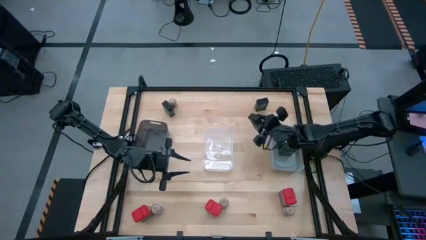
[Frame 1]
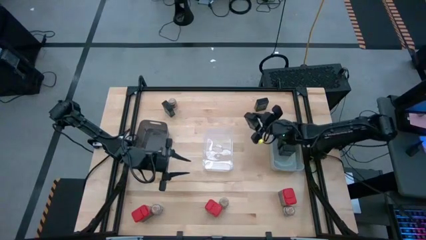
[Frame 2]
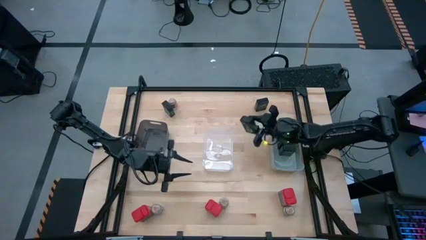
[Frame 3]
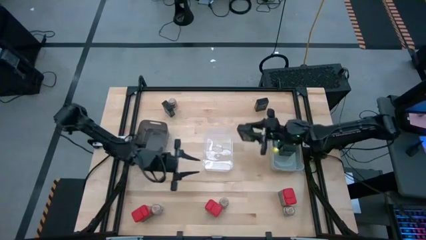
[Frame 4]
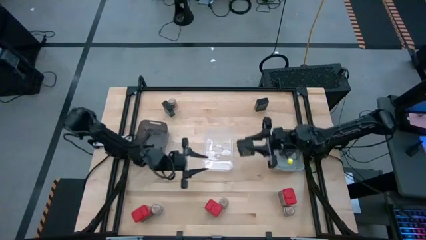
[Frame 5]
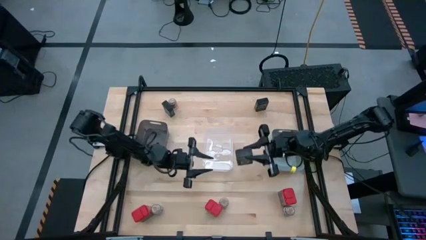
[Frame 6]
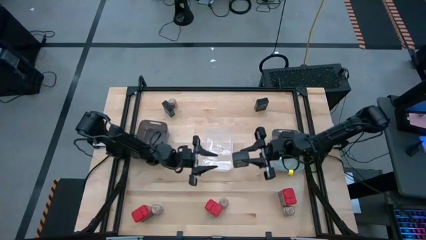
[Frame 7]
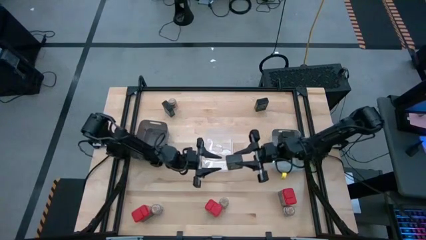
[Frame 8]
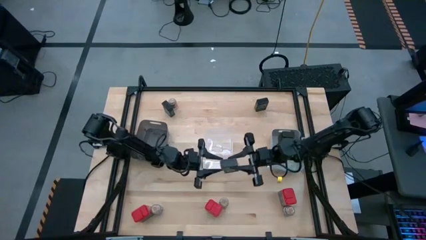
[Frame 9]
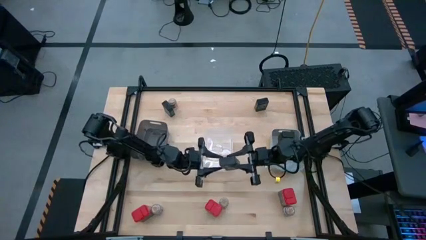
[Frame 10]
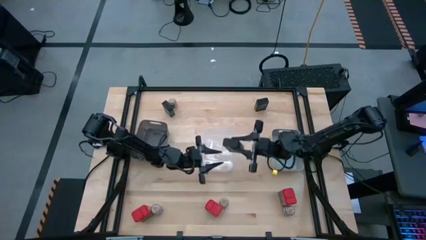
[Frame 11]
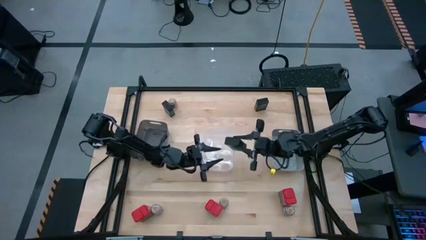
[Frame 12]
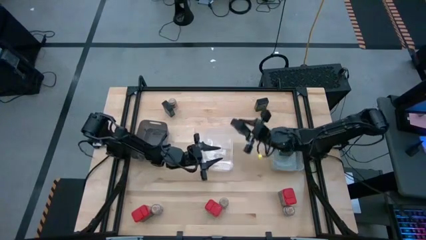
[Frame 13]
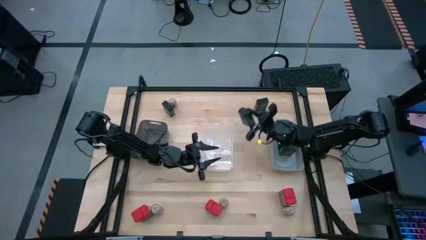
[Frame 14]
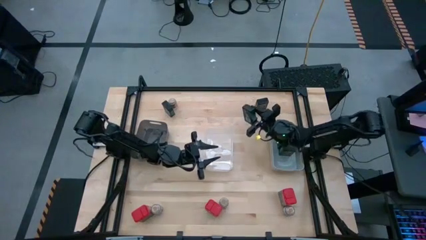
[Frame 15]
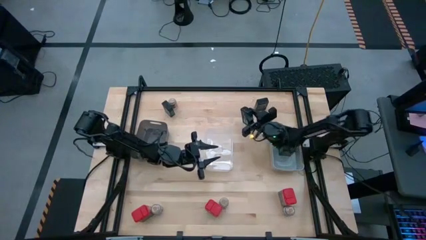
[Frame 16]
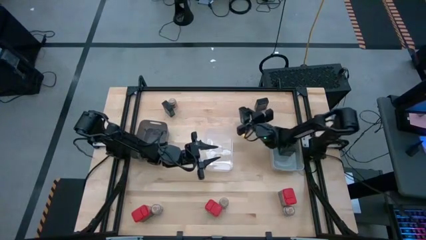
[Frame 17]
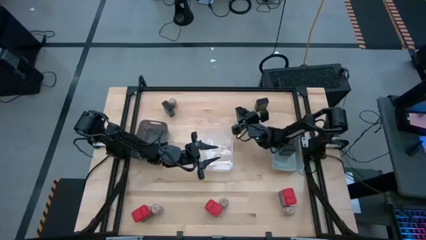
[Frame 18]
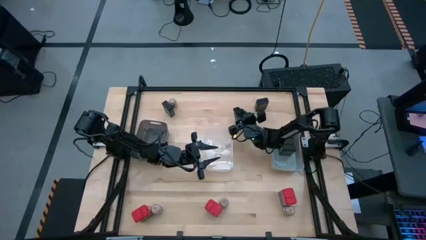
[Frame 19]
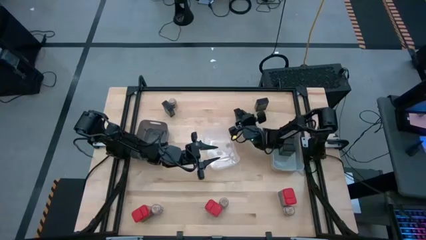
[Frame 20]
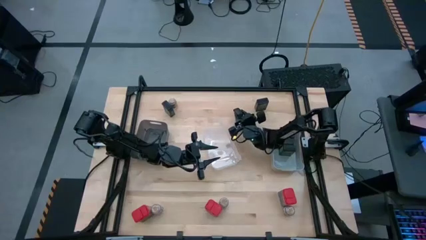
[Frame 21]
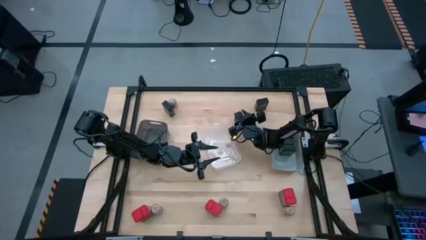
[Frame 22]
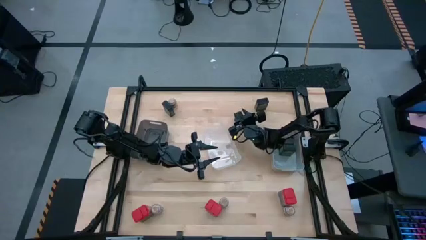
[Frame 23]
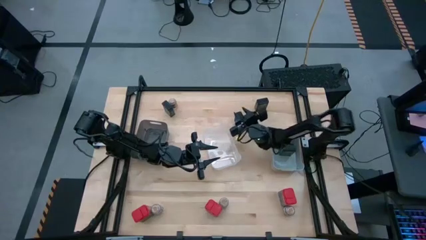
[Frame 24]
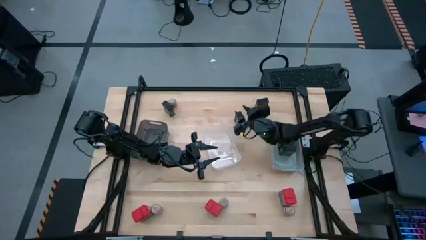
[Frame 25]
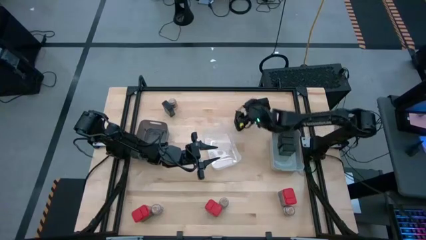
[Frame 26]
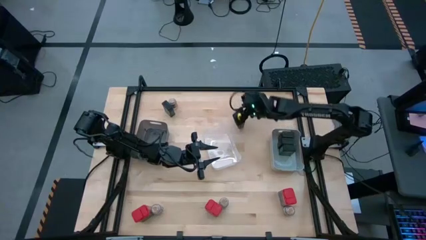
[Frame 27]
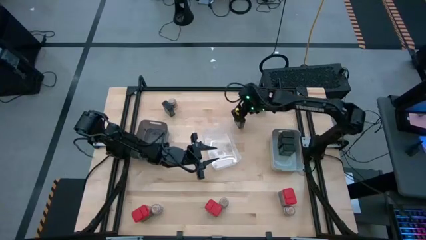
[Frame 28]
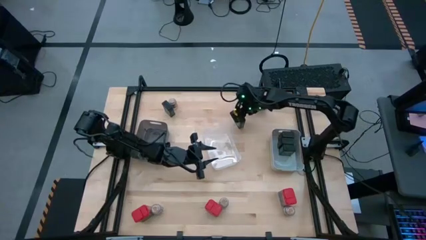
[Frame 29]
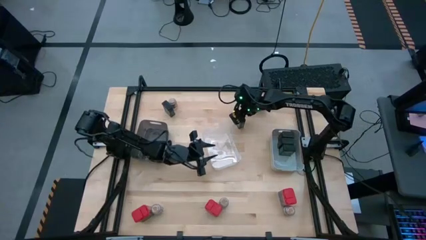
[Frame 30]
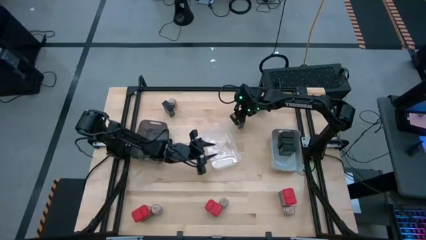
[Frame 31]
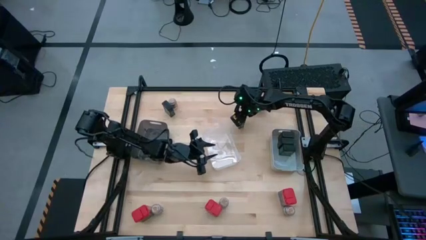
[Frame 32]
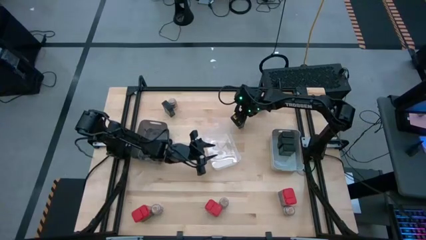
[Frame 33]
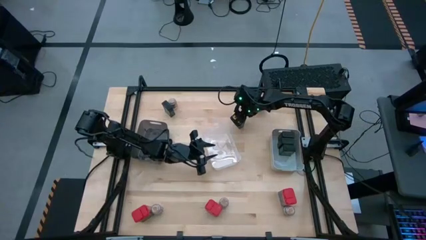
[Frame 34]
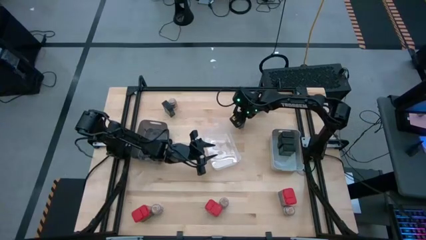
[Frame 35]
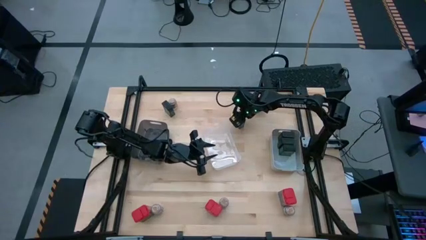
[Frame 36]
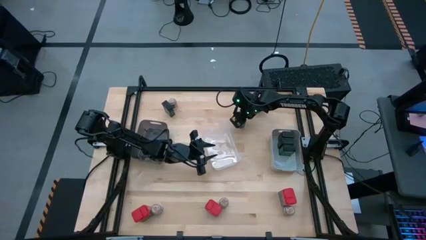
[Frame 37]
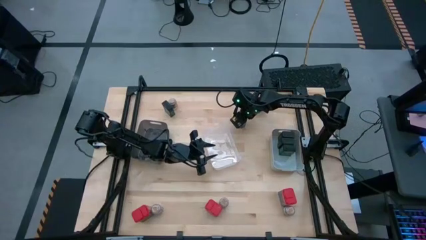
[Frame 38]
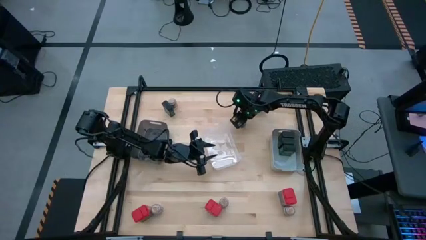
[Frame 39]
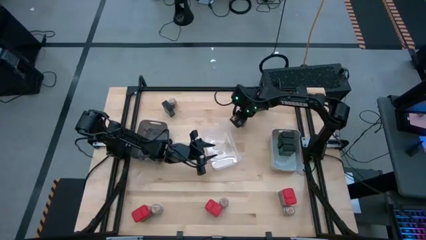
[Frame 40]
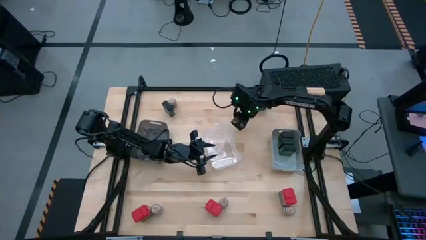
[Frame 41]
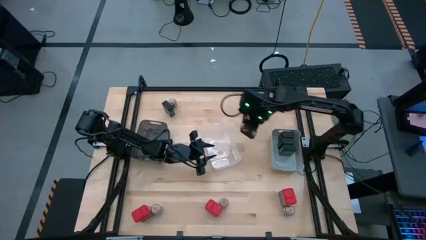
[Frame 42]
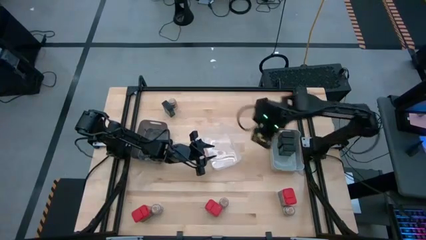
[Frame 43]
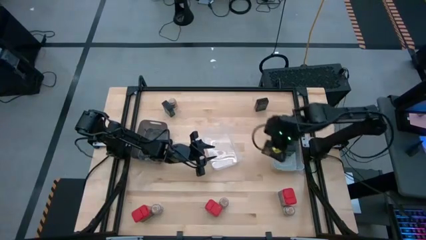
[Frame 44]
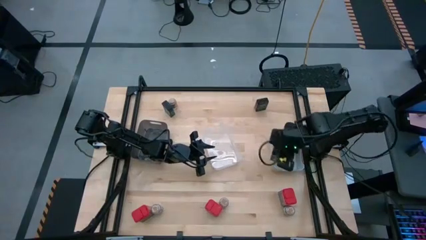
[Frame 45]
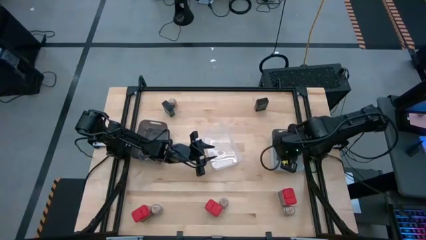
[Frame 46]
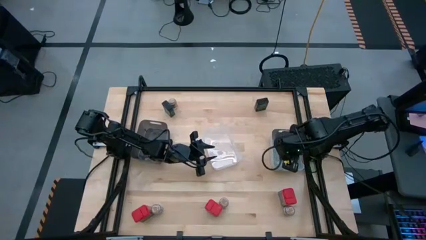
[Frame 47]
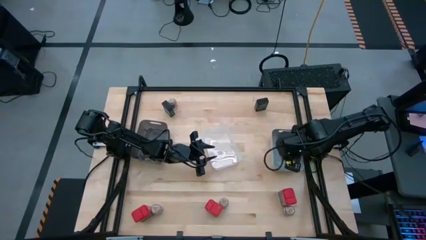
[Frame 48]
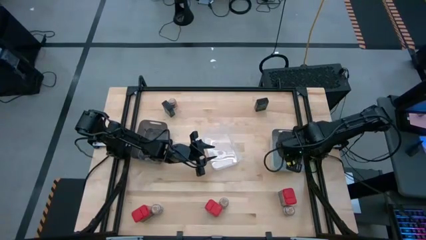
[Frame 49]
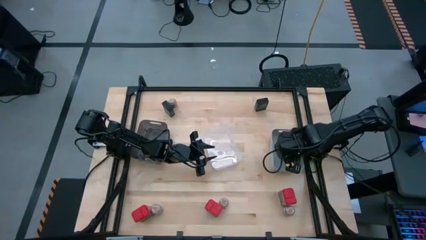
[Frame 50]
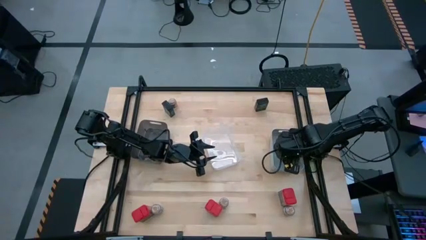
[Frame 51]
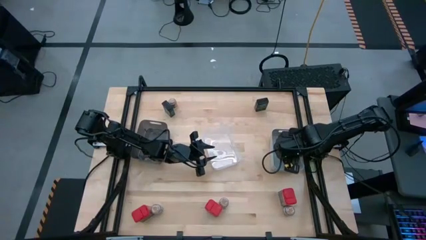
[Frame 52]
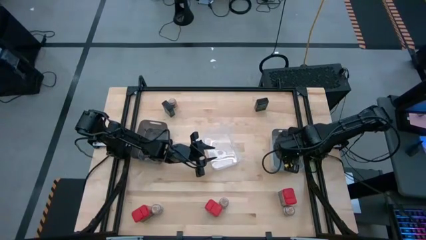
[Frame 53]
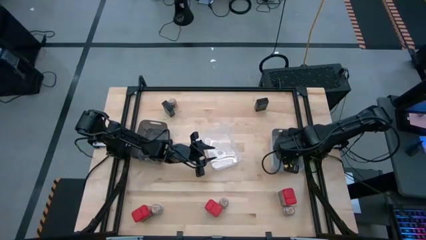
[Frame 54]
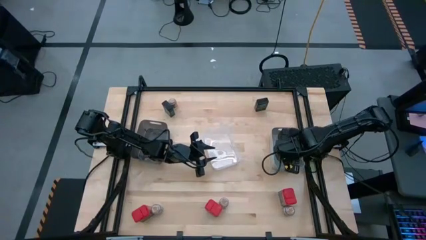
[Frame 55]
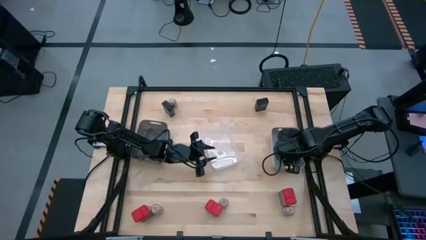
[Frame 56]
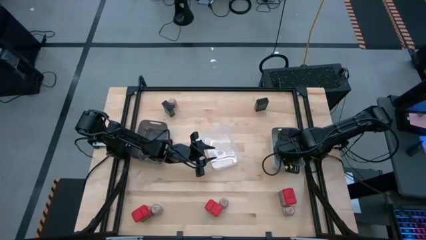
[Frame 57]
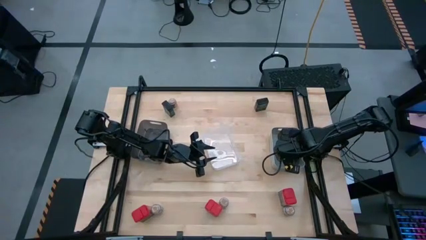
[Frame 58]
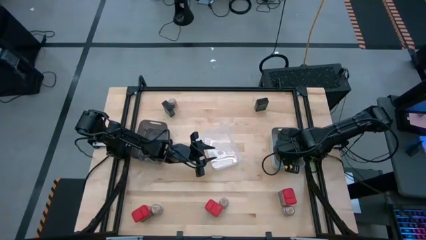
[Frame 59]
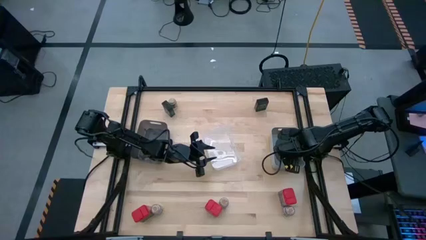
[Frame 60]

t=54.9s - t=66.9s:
Task: Sort spices by type
Put the black seasoning can into the gray bin

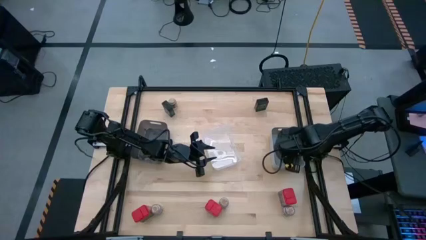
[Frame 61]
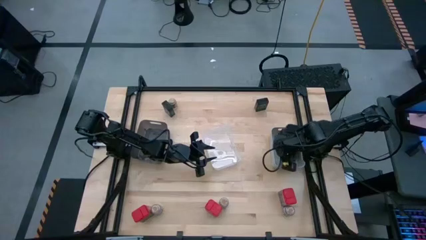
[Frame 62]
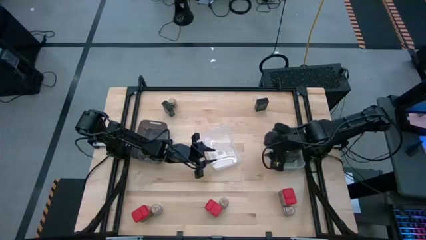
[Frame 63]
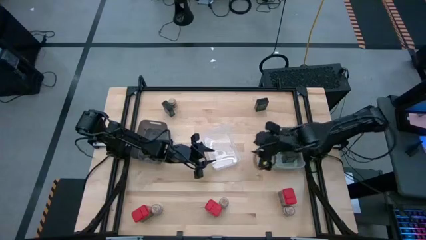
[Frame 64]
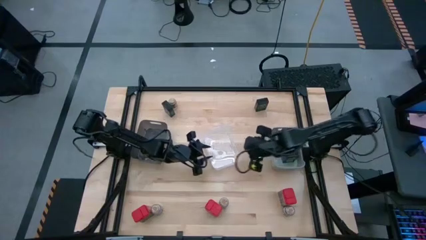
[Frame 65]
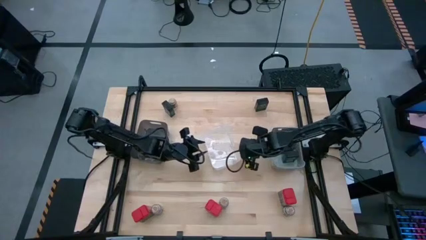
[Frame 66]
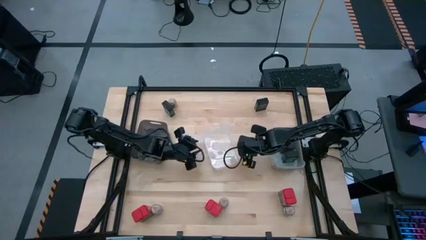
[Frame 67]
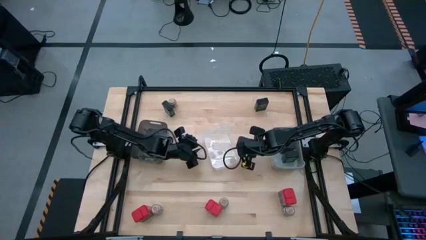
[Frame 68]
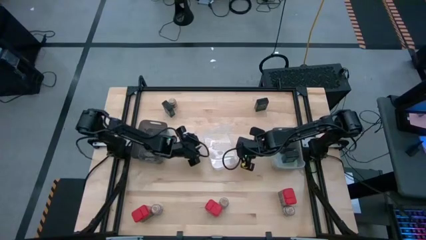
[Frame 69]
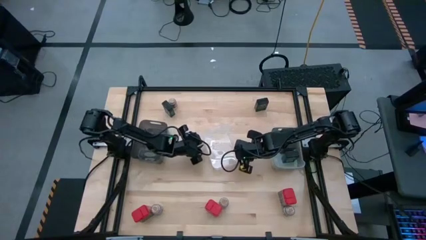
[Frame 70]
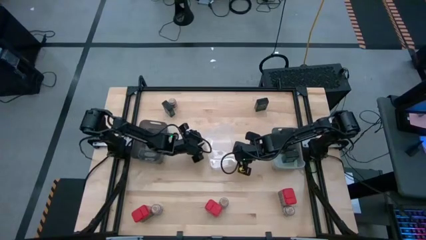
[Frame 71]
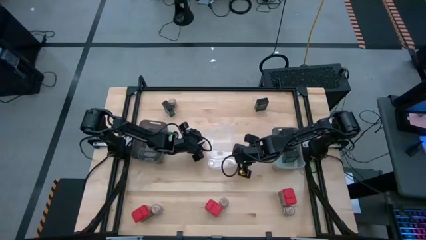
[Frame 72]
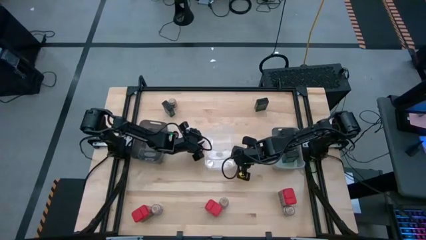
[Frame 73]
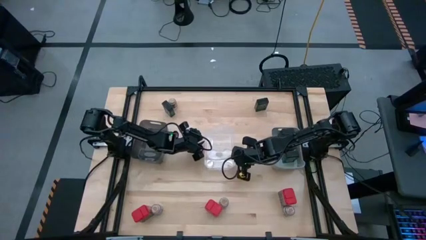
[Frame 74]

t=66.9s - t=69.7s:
Adjust the transparent bin on the table
